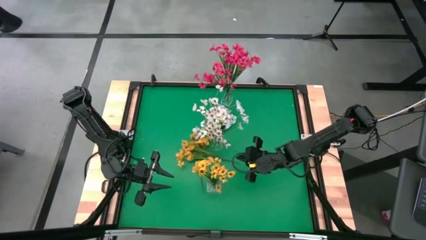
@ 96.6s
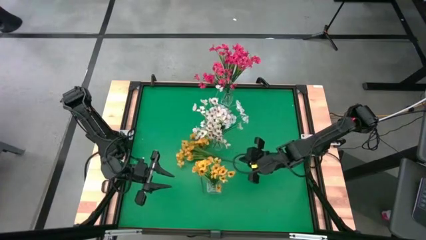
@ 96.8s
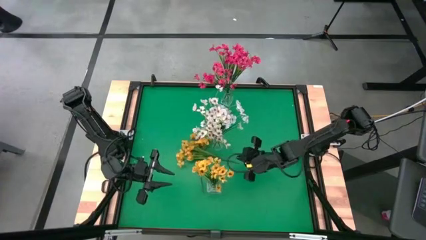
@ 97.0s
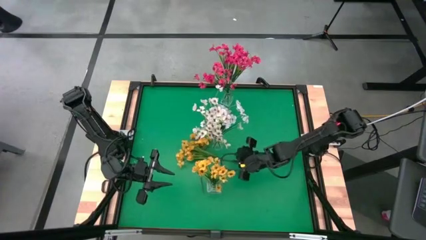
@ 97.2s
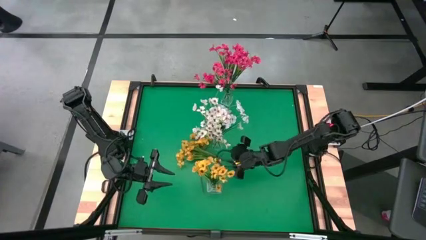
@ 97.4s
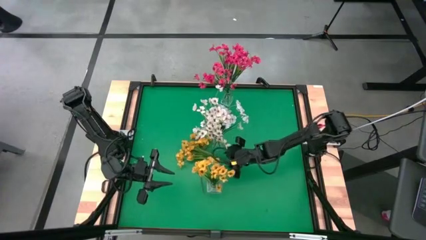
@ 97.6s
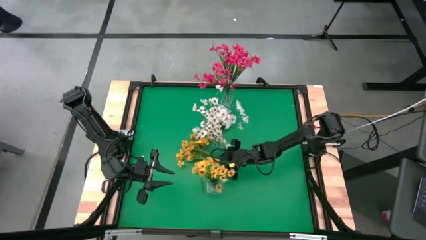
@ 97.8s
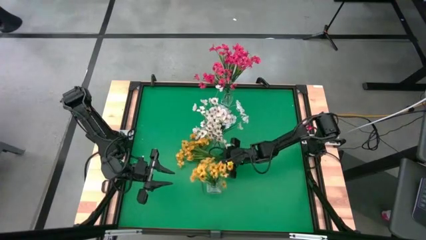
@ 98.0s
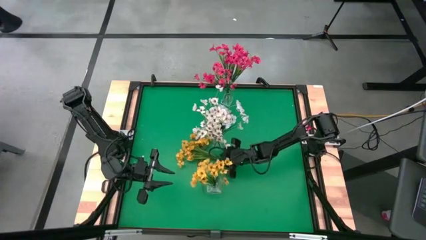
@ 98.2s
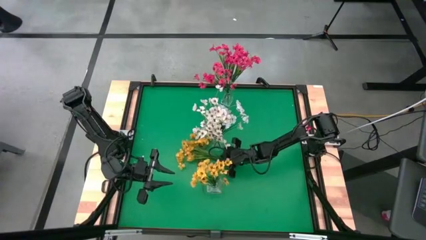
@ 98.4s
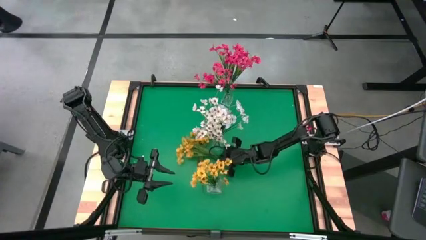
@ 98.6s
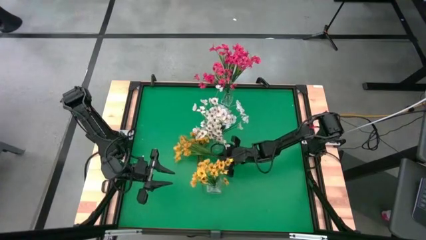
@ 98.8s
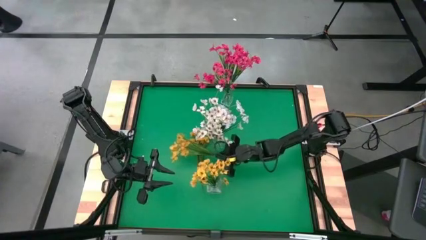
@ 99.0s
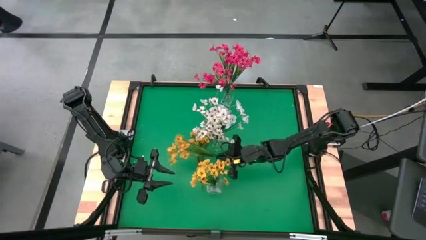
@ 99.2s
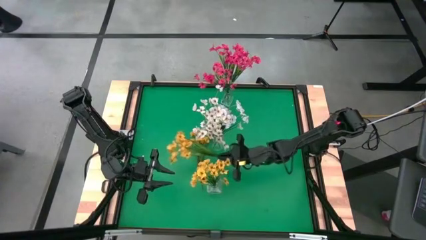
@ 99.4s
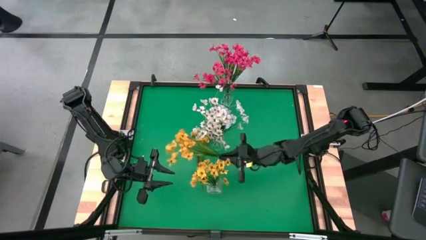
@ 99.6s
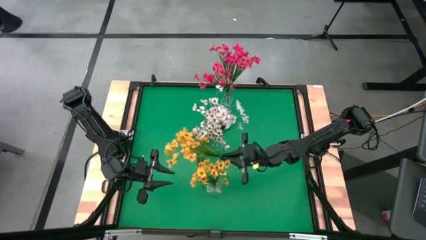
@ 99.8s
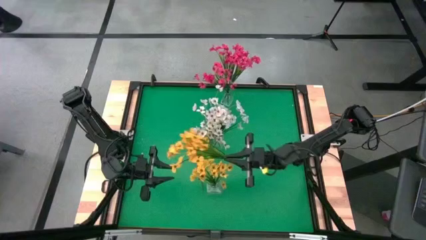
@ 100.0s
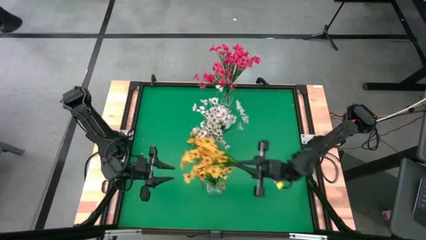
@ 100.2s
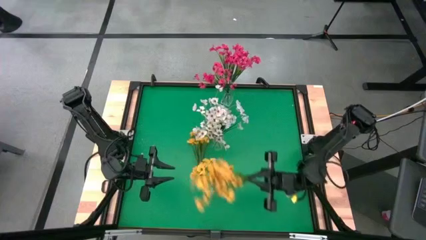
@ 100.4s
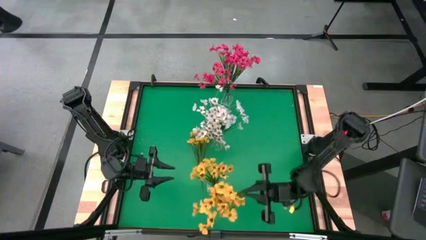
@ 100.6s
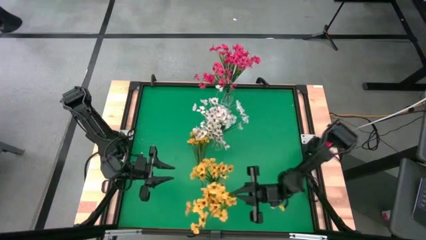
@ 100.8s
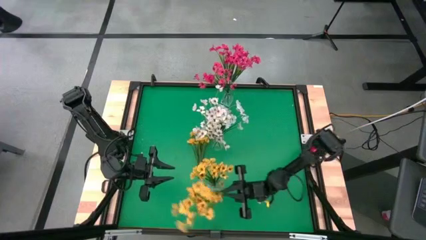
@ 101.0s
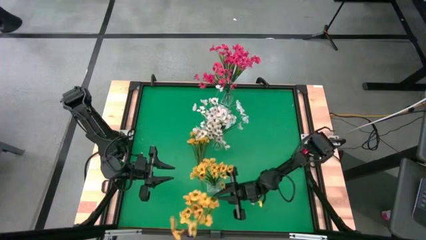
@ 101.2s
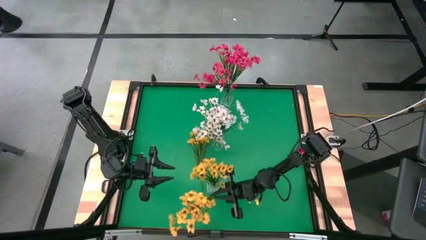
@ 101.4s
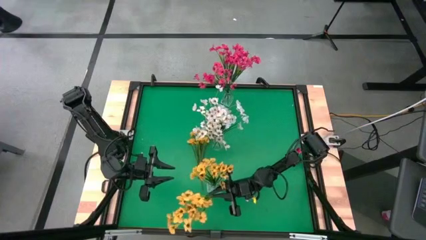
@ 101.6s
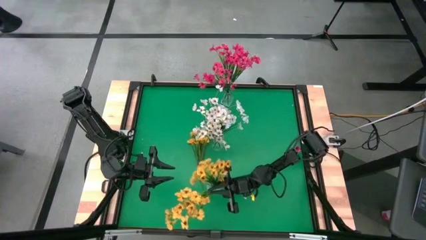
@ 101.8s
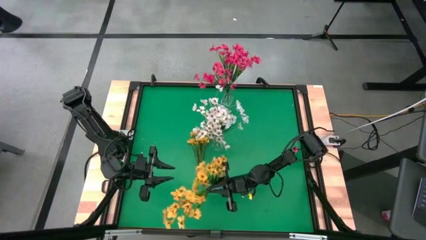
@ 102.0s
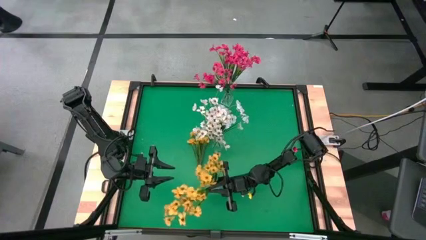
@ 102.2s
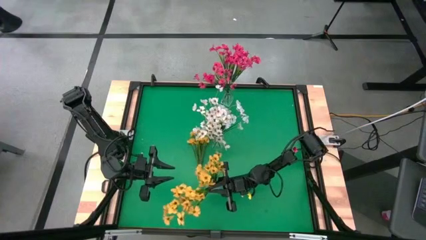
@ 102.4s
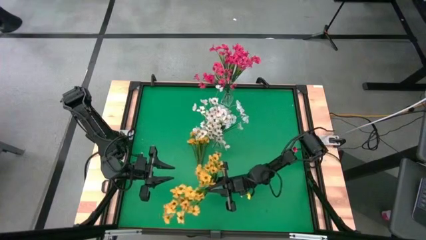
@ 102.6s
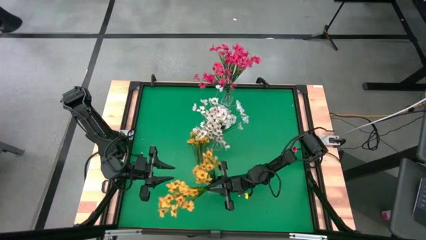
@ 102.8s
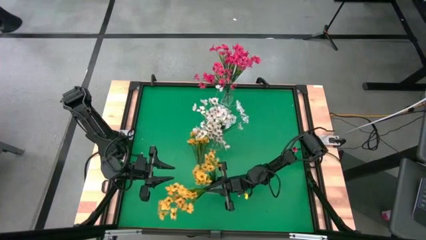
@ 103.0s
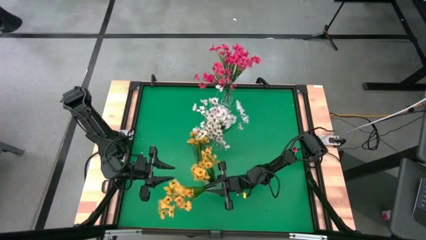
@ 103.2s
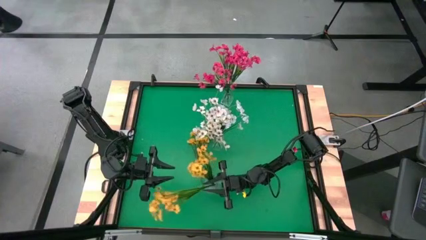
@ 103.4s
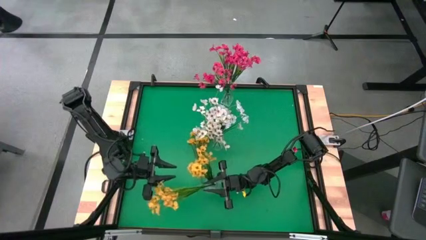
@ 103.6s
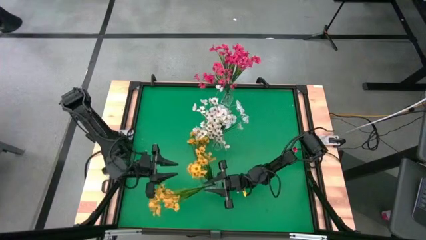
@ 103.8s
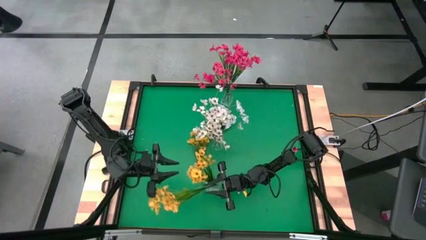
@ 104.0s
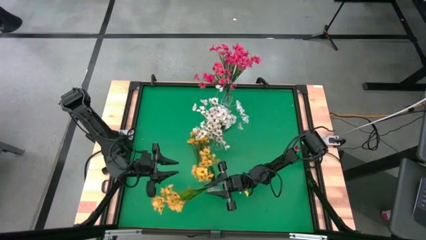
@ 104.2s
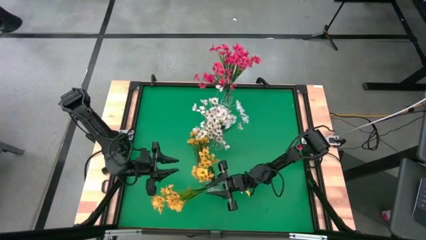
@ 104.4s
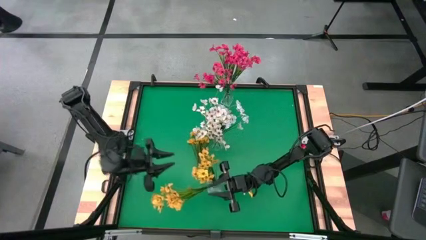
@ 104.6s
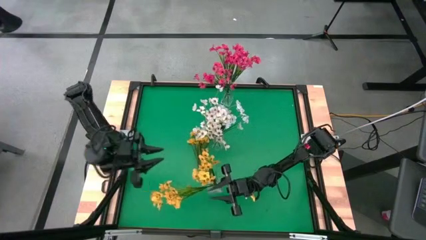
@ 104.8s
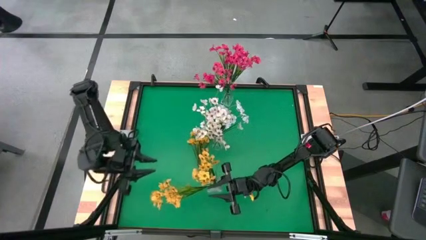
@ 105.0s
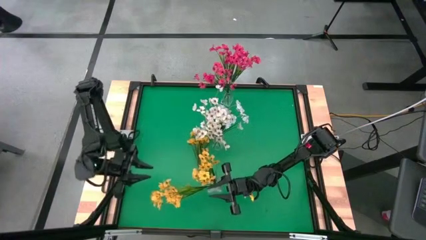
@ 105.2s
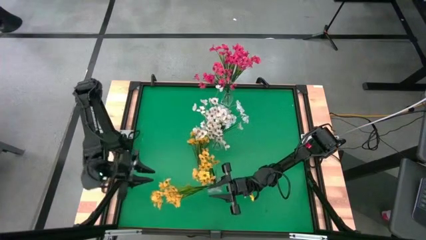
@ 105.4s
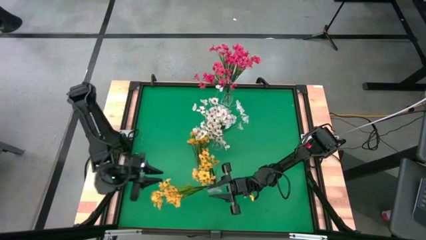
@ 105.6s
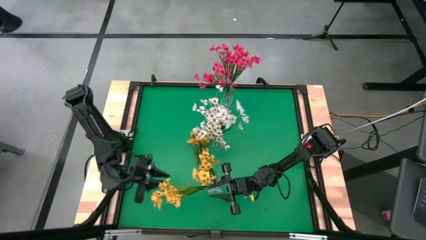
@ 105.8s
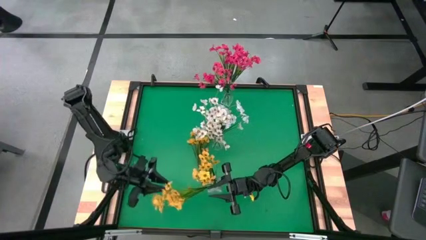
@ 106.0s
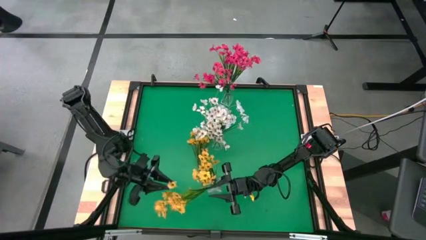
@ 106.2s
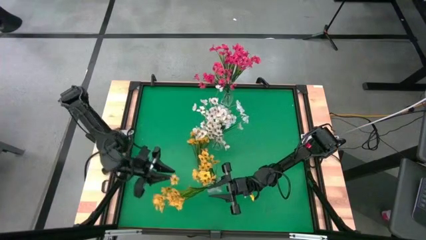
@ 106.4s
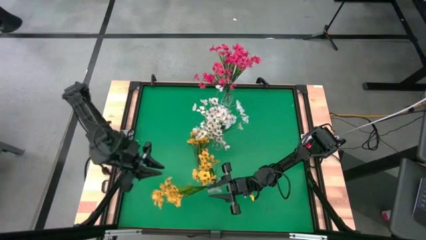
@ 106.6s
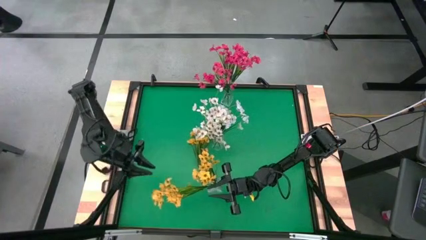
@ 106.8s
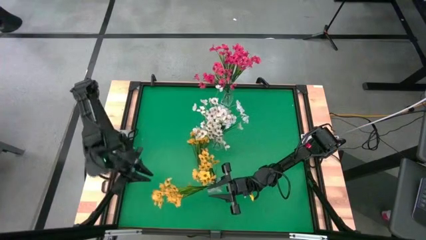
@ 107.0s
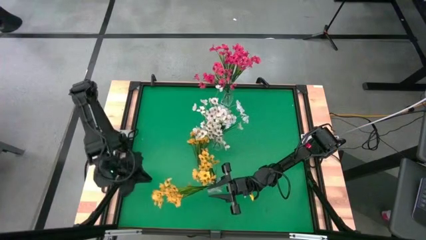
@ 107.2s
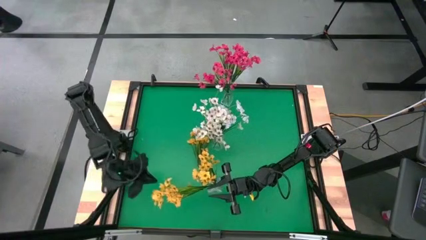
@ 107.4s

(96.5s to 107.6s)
Task: Sort flowers into vase by color
Put the bottom yellow flowers into the bottom transparent vase

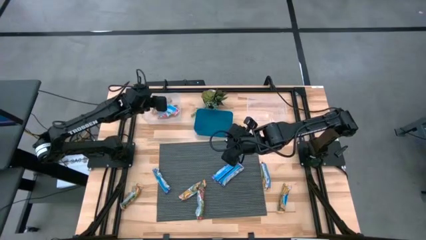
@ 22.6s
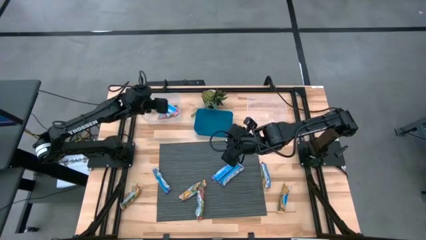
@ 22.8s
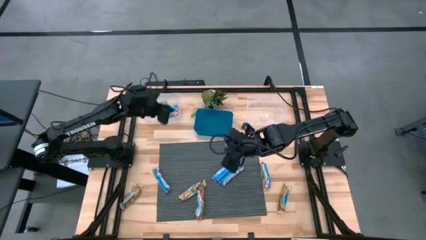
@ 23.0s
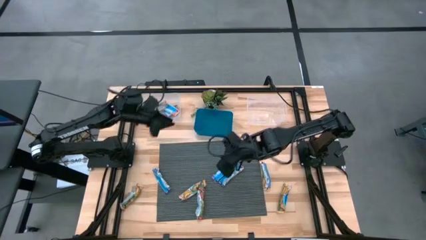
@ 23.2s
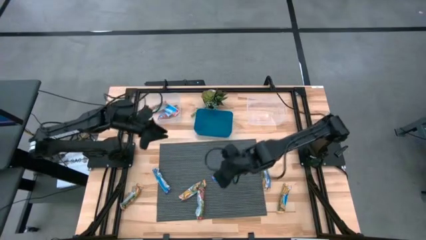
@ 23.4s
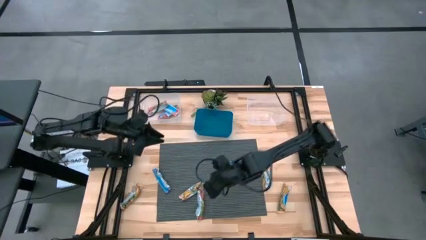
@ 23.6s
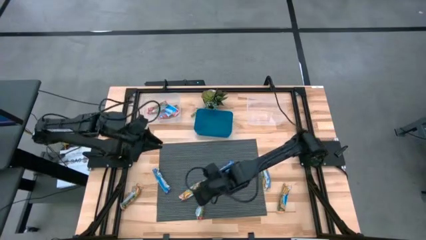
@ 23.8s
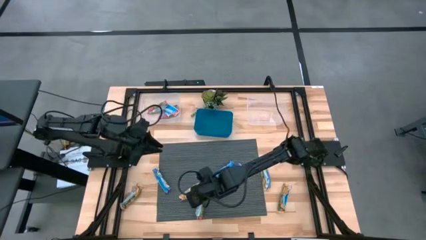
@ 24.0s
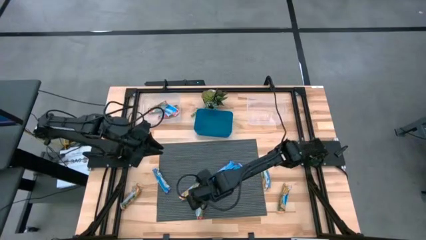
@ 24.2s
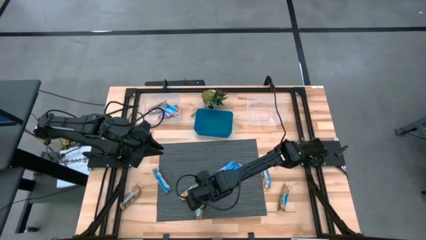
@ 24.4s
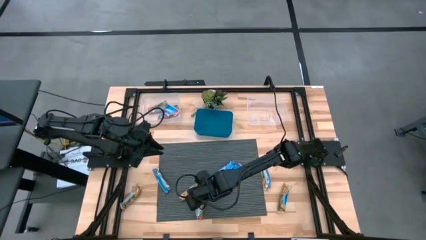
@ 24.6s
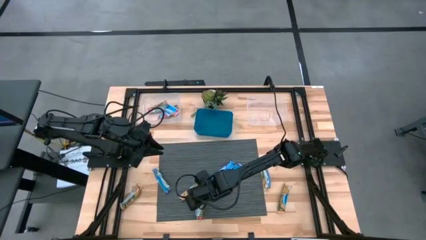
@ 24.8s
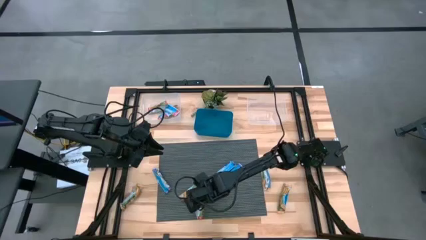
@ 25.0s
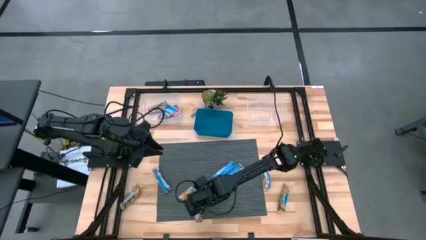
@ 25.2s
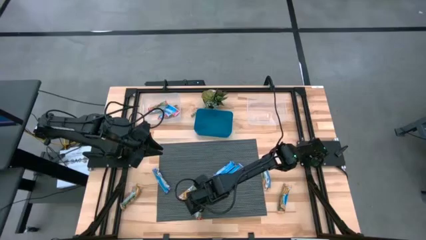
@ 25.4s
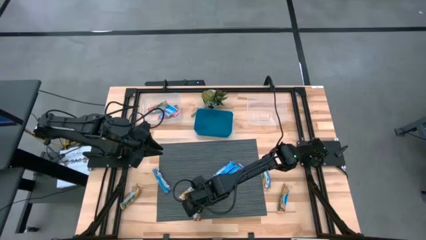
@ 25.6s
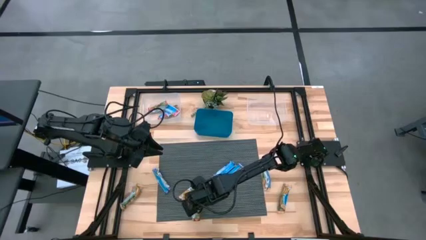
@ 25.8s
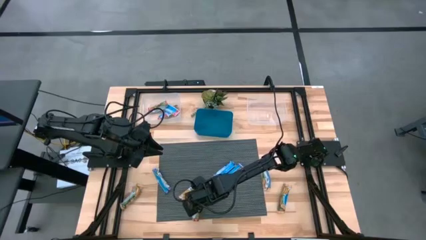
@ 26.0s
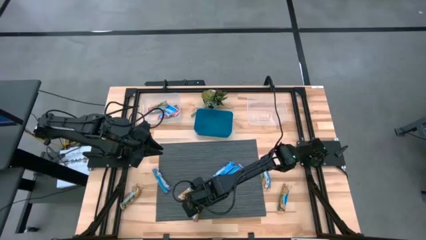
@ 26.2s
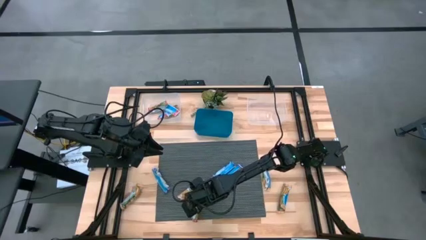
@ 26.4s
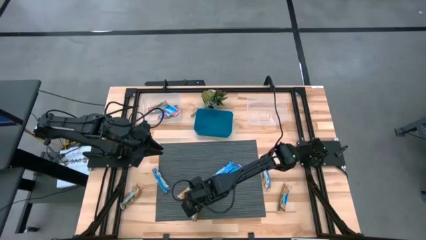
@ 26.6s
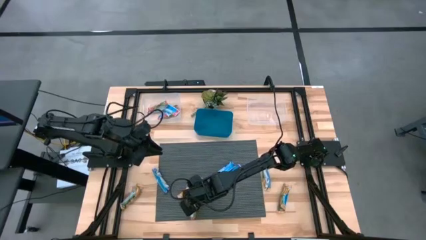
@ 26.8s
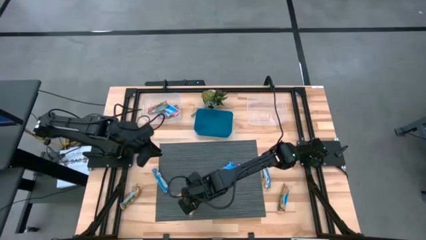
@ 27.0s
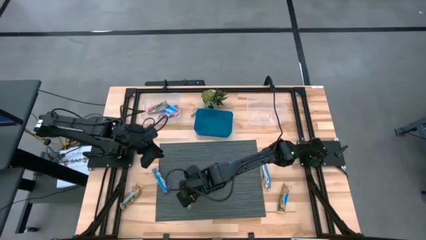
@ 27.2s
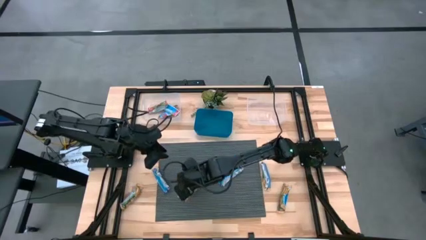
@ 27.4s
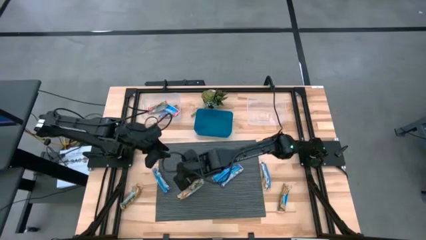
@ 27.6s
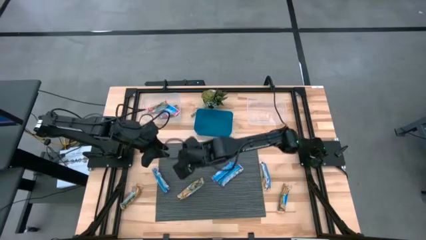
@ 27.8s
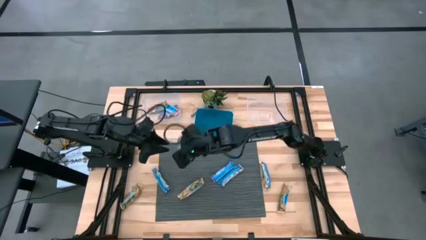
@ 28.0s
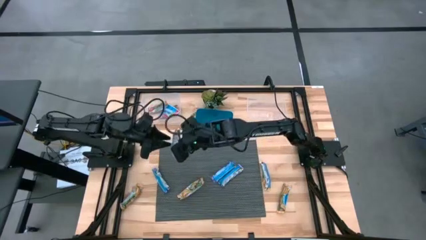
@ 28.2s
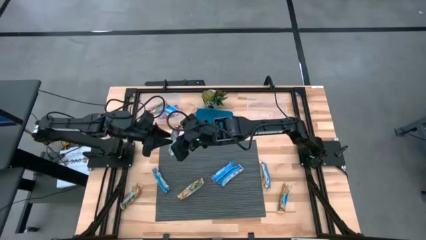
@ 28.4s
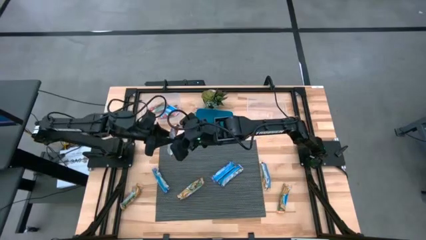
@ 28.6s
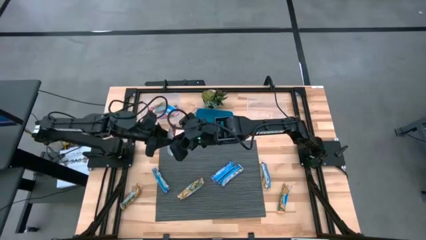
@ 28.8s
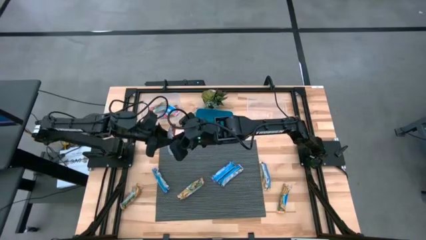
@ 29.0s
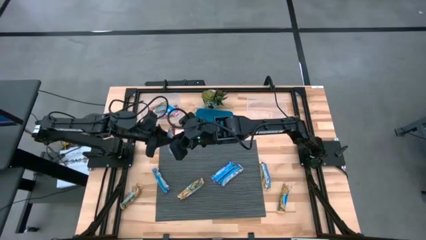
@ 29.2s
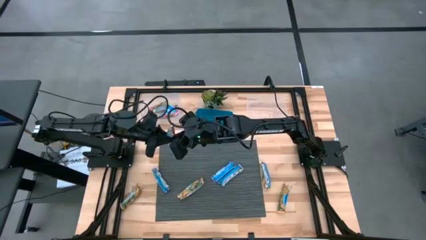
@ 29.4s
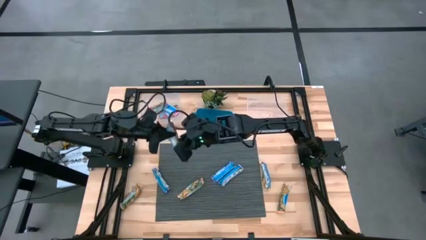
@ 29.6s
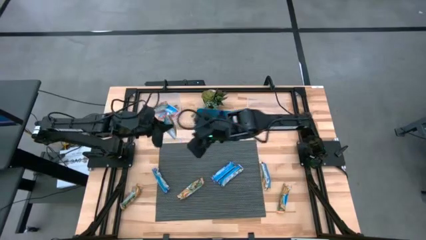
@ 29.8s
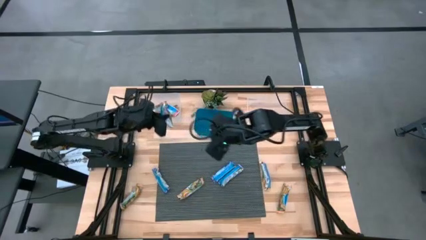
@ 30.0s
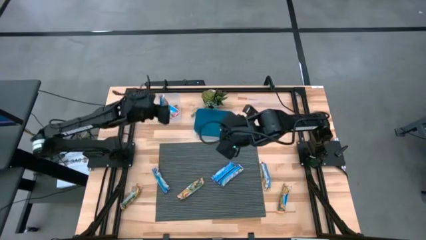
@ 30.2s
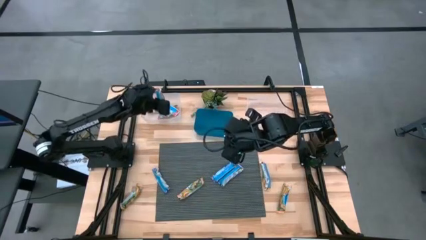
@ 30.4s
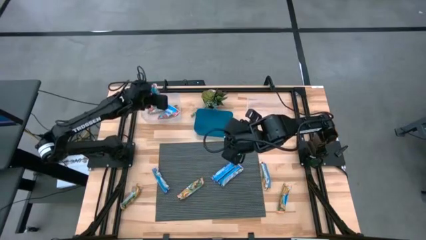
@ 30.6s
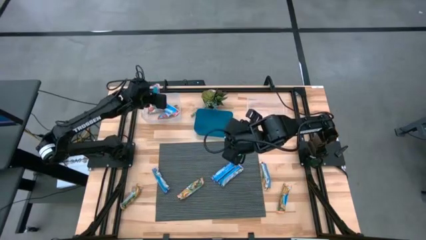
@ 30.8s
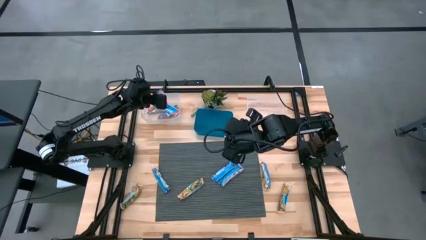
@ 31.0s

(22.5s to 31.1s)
Task: Pick and place Granola Bars by type
Put the red granola bar into the left transparent bin
